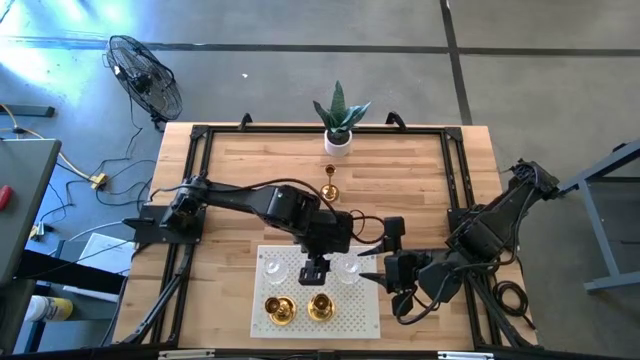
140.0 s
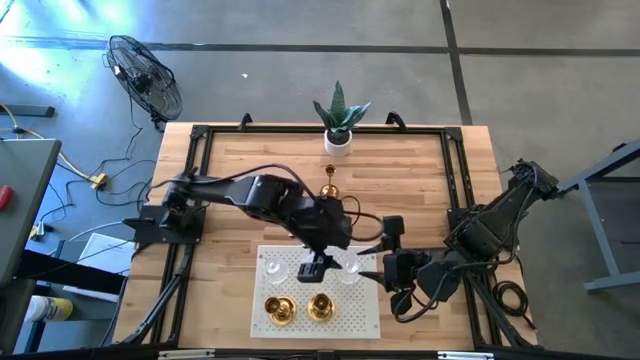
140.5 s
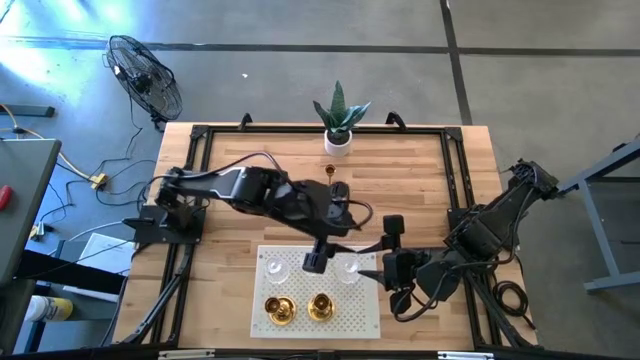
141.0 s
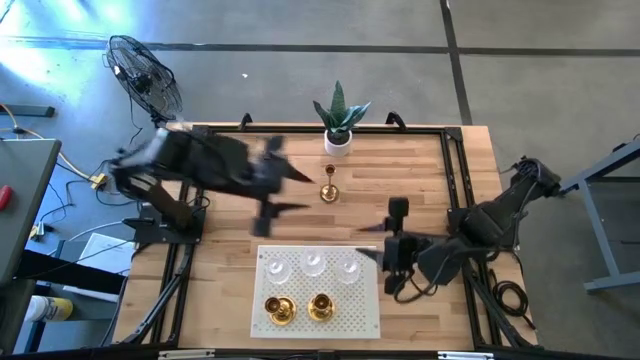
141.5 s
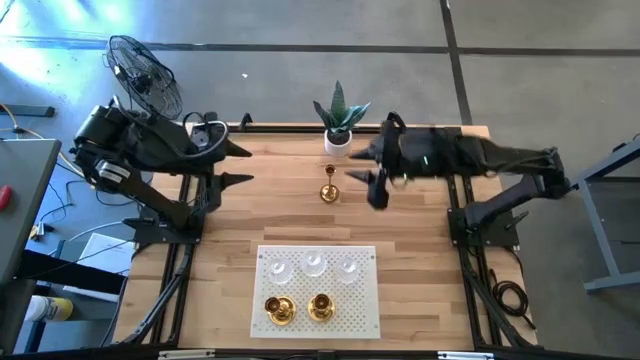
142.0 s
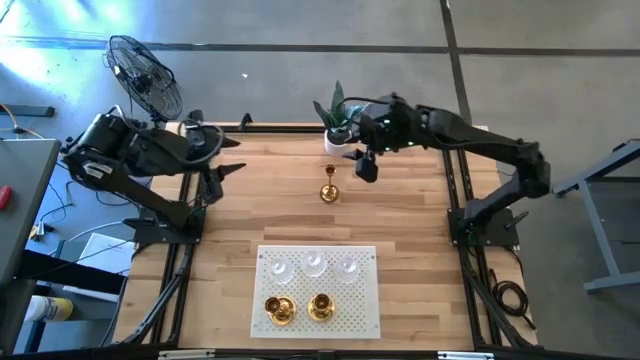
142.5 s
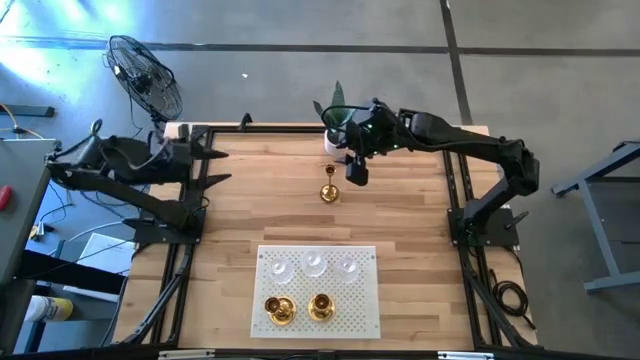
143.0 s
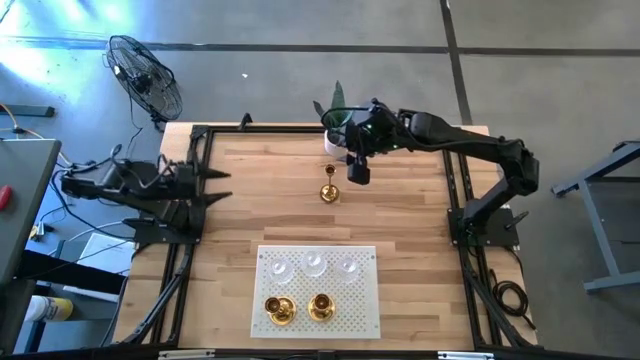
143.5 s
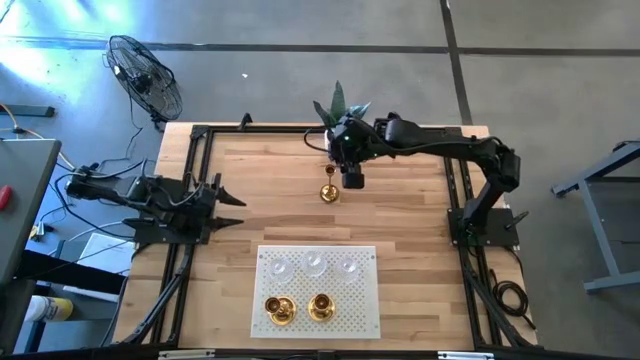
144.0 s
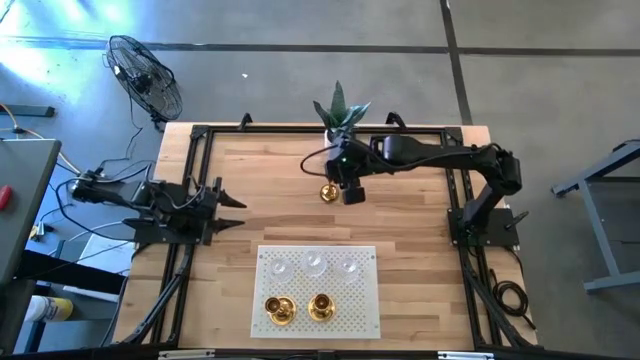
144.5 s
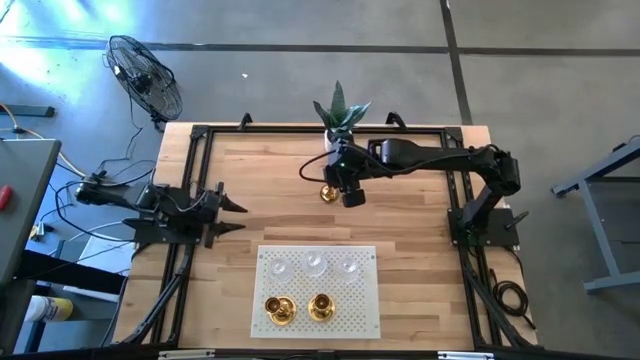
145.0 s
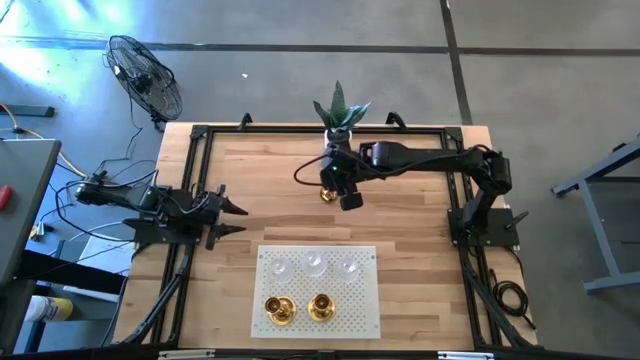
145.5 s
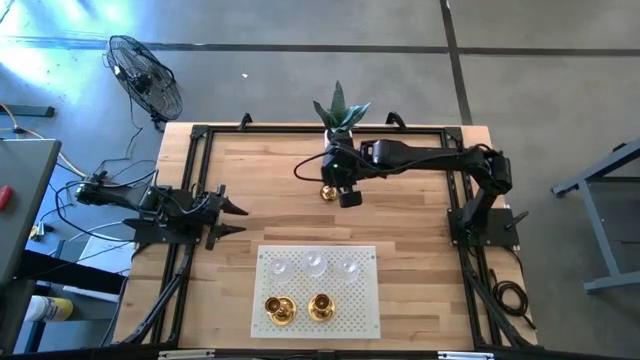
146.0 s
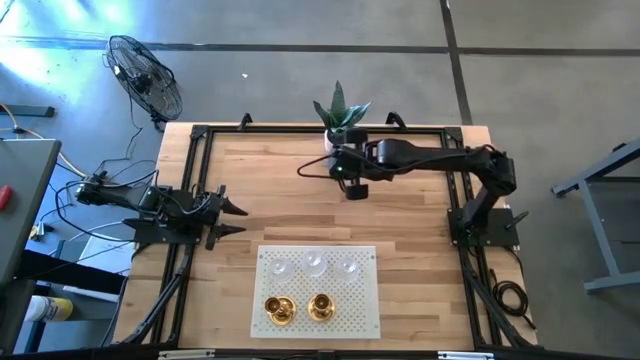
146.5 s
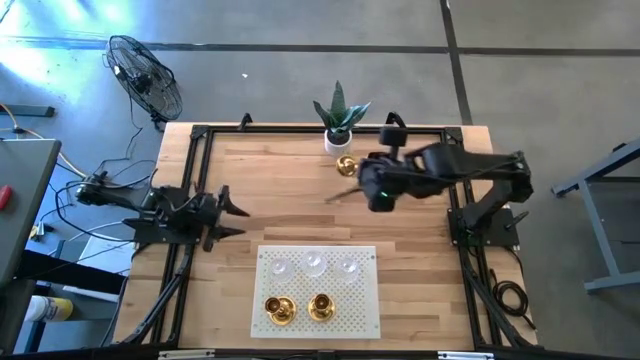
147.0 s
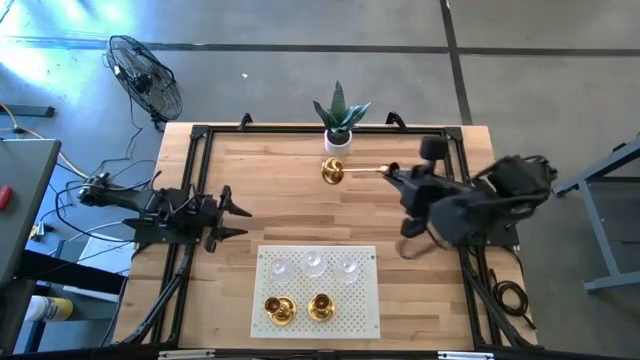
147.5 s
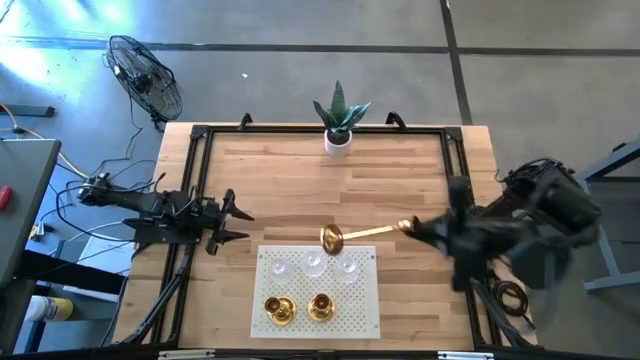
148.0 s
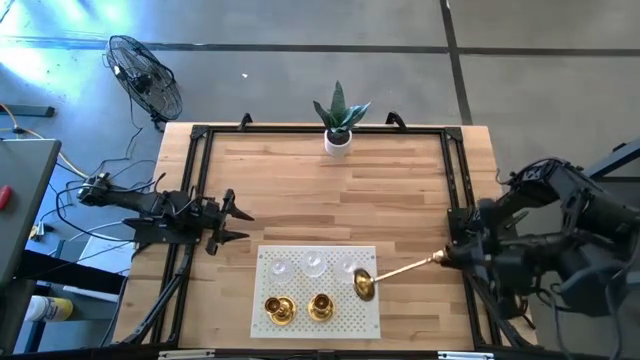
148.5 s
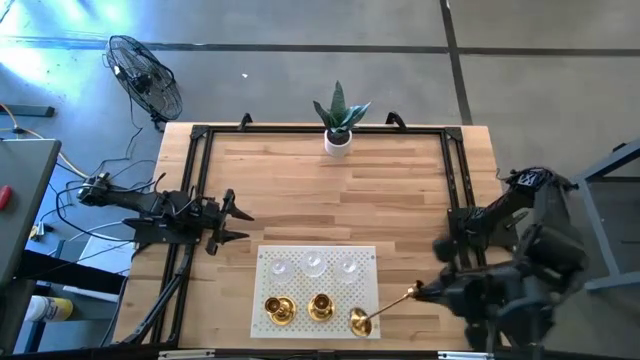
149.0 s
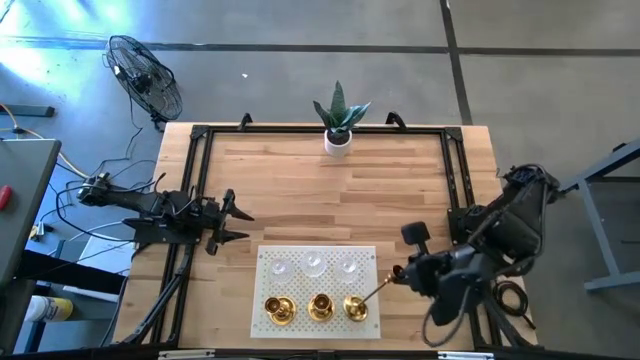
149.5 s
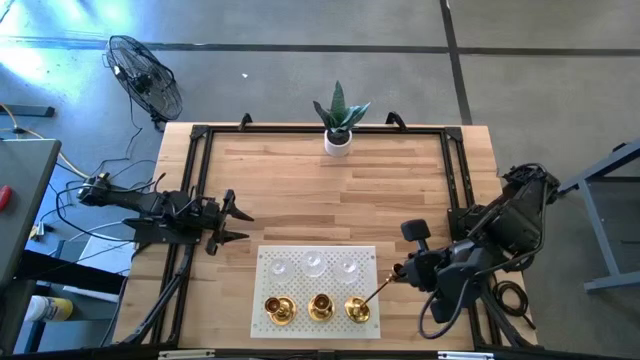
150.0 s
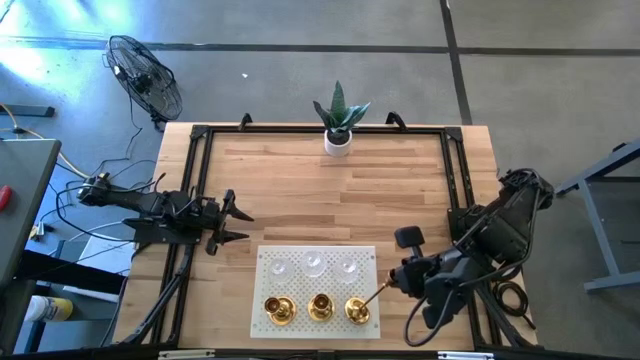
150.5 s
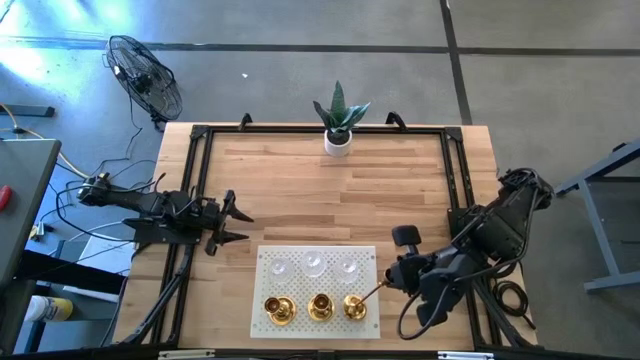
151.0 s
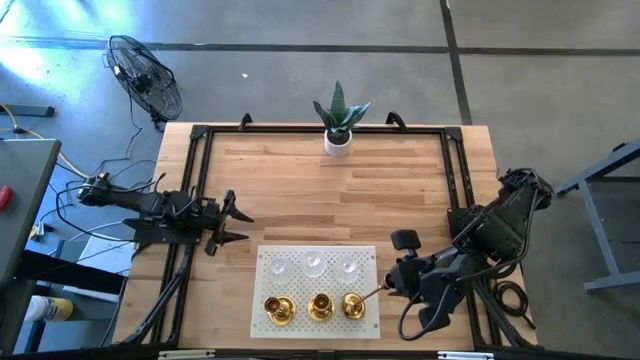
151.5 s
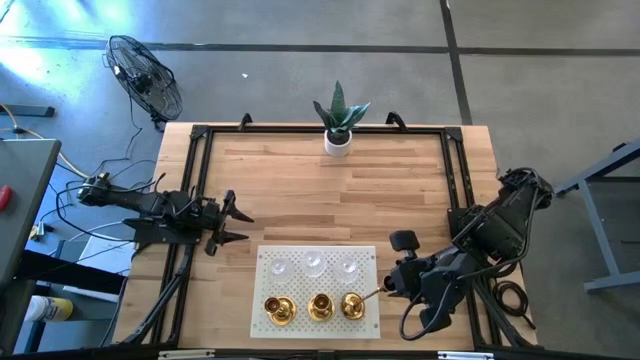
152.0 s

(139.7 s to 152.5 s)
Task: Pick & Place candle stick holders
Put the gold candle holder on the shelf

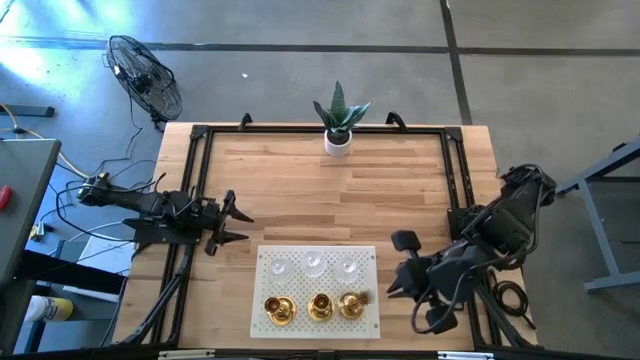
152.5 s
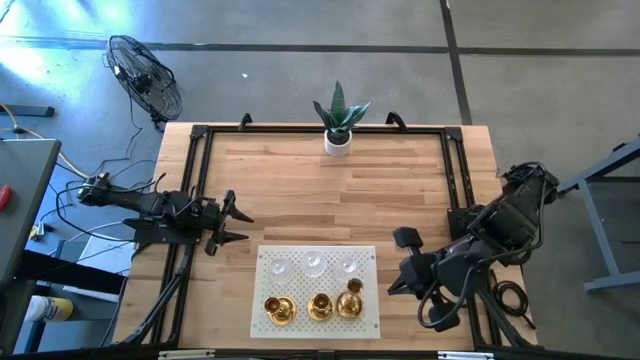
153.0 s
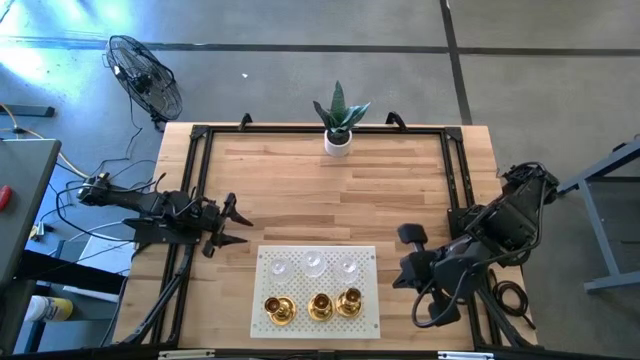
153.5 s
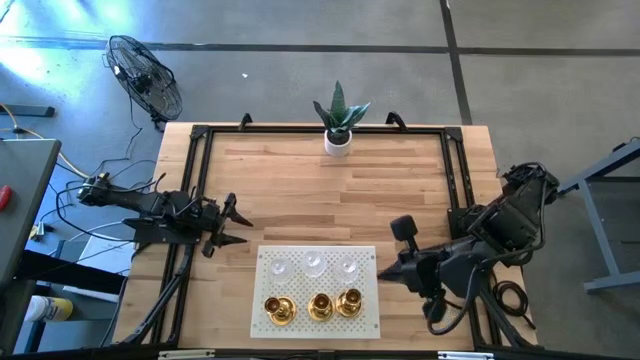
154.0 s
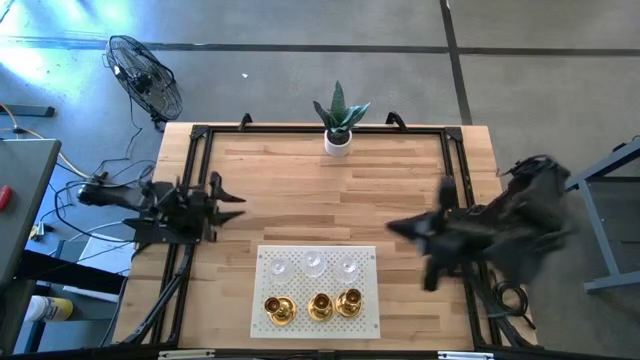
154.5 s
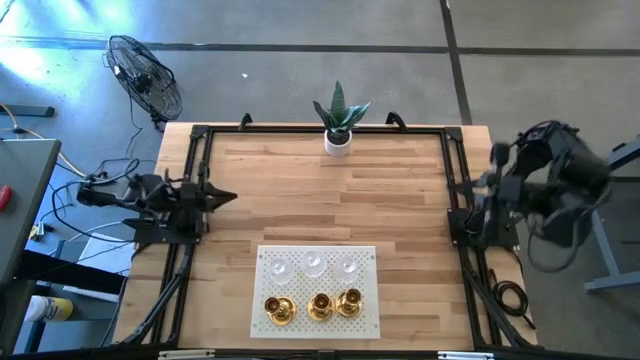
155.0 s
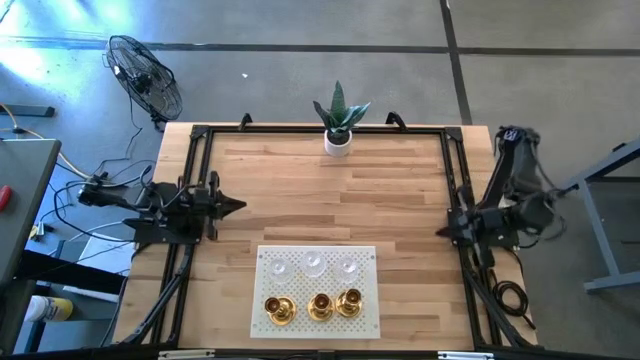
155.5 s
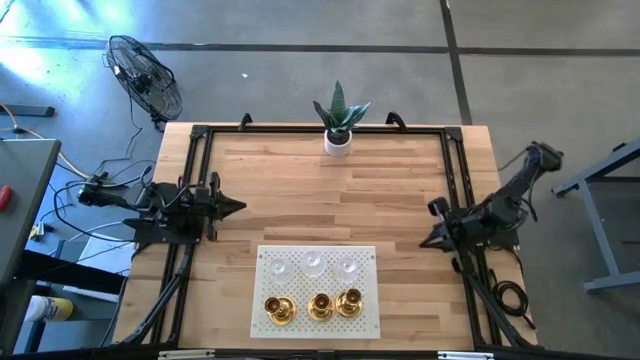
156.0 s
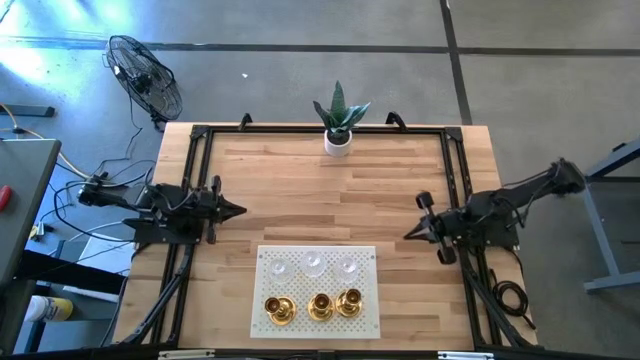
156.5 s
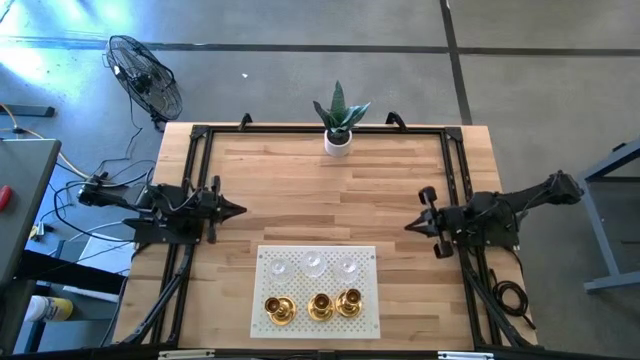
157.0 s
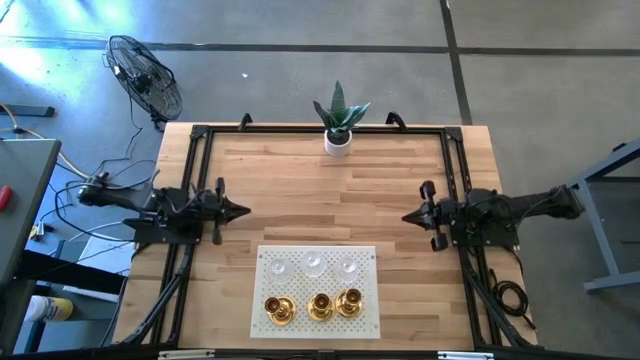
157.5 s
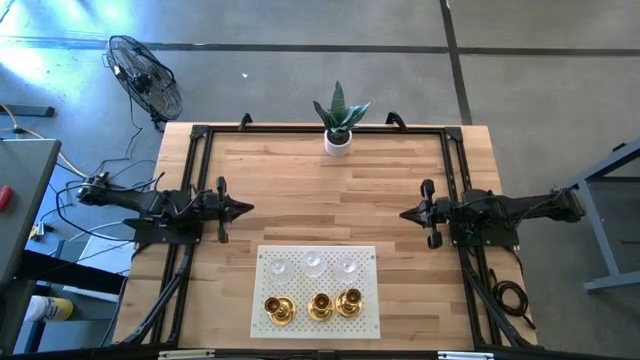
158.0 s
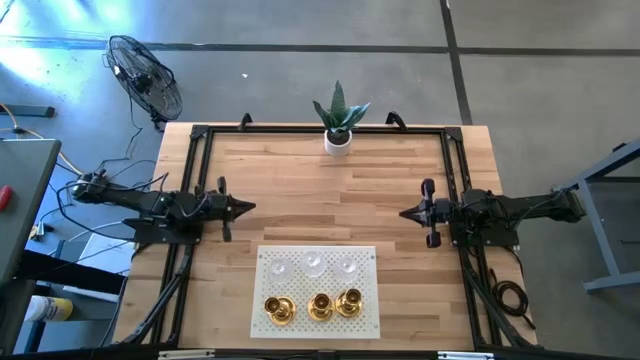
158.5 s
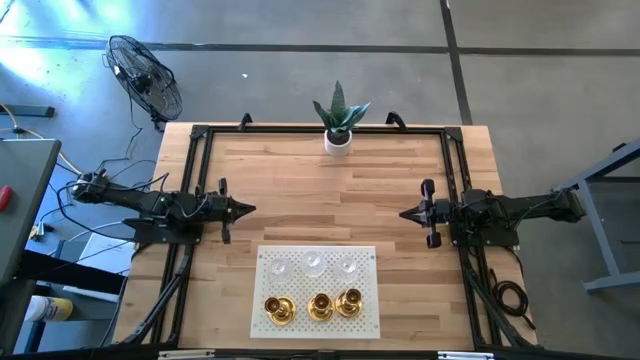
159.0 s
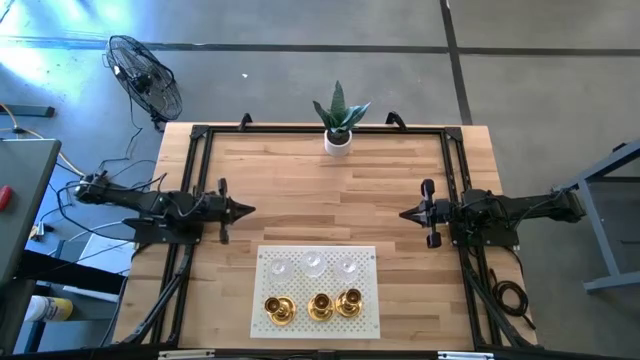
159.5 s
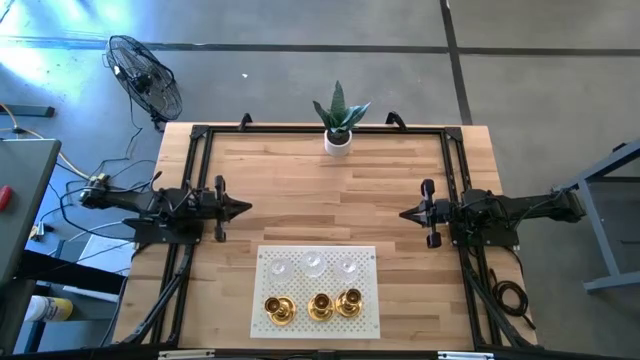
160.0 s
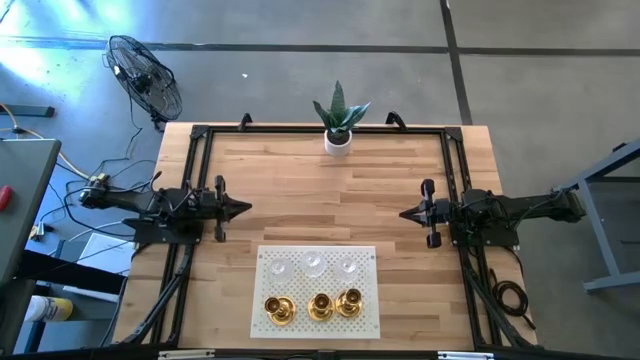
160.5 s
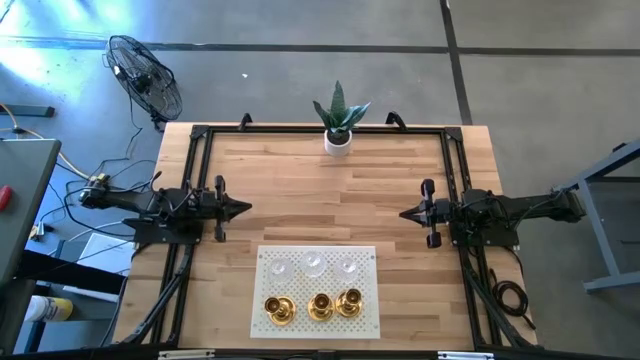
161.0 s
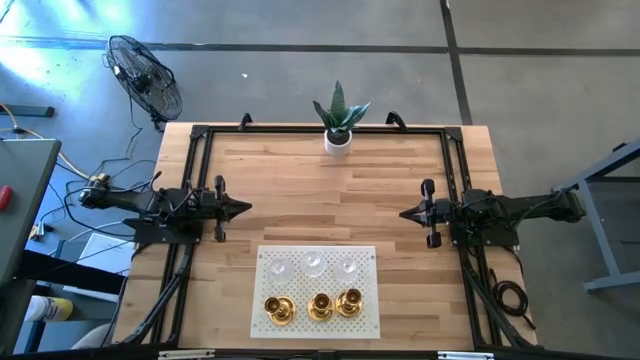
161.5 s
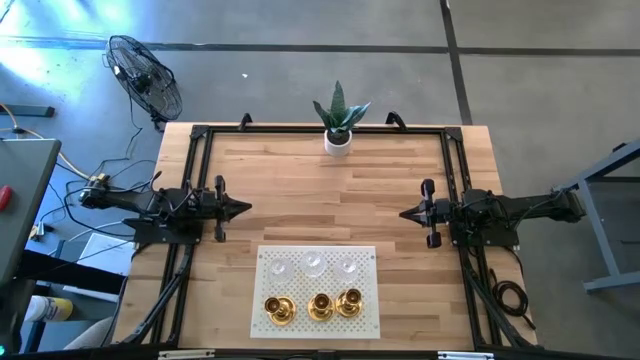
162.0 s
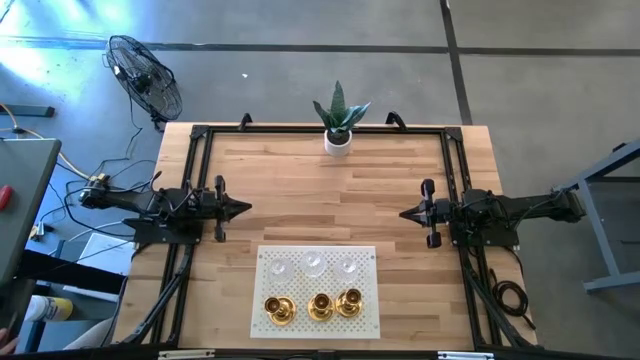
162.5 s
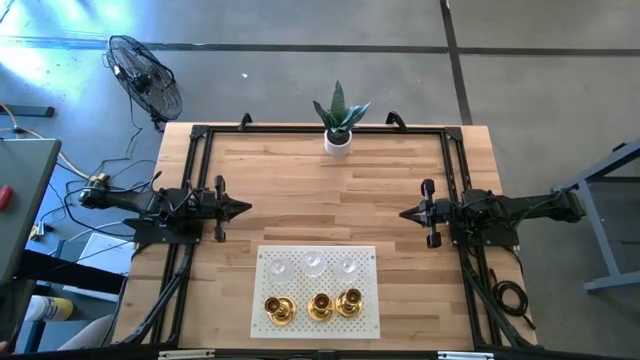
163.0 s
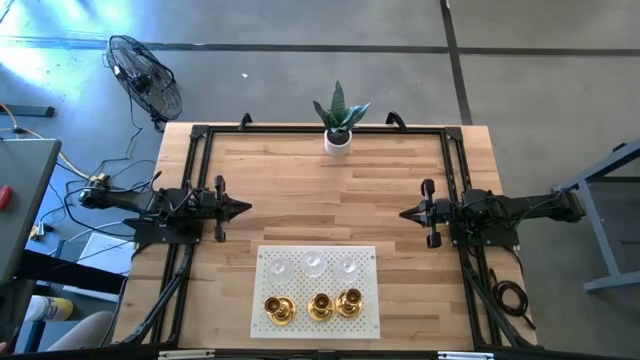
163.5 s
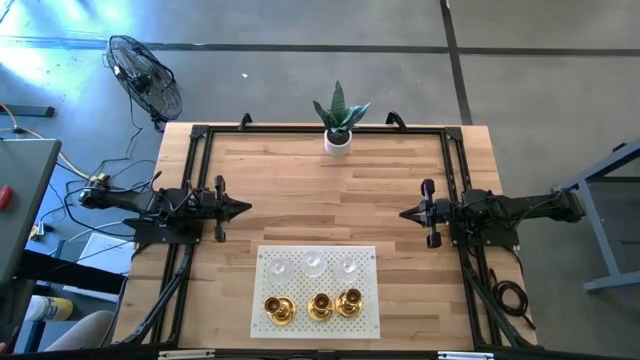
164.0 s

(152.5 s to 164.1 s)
Return to Home Position
